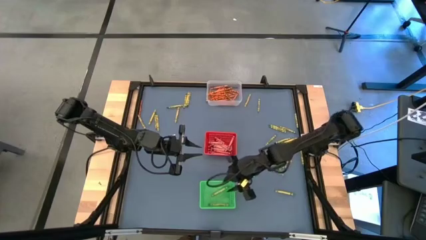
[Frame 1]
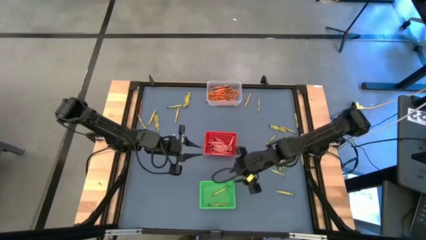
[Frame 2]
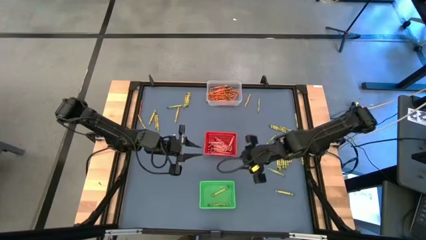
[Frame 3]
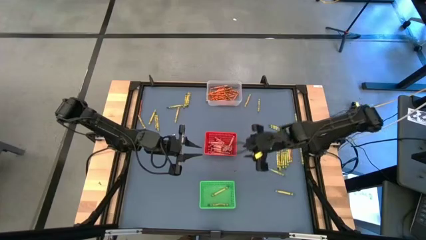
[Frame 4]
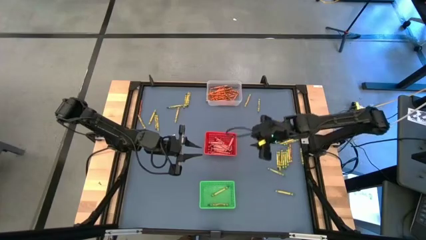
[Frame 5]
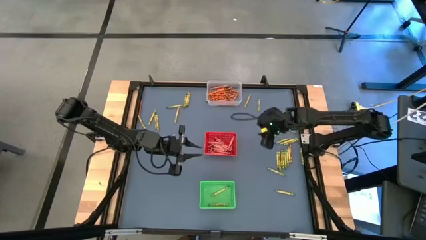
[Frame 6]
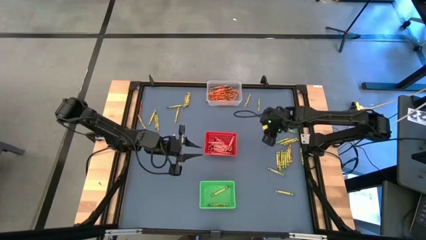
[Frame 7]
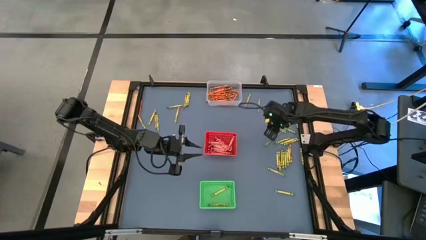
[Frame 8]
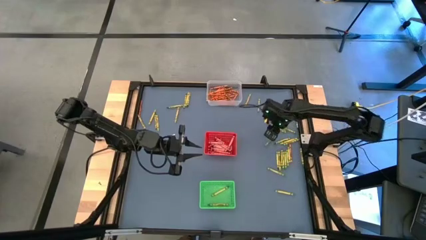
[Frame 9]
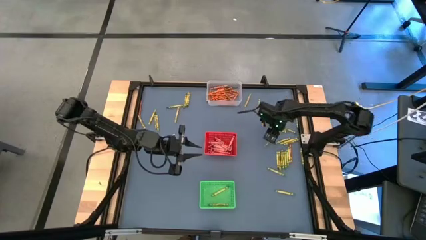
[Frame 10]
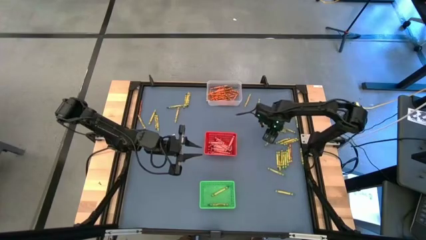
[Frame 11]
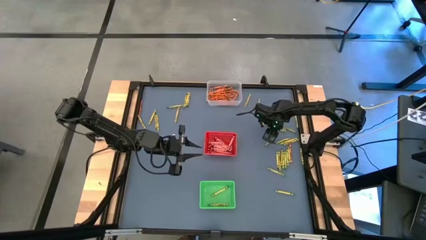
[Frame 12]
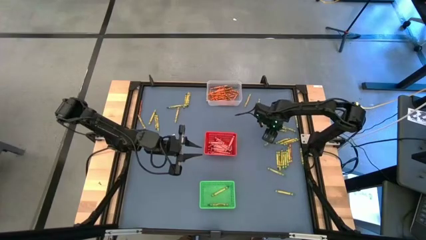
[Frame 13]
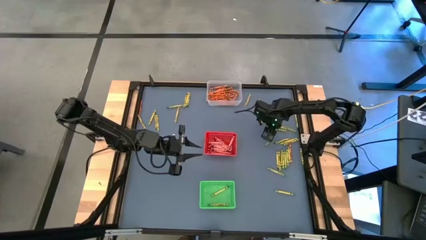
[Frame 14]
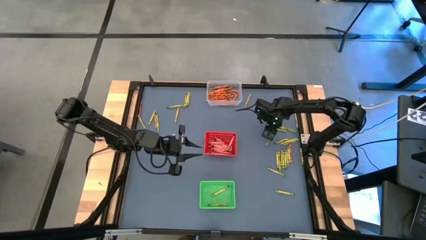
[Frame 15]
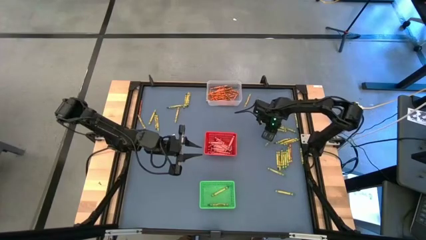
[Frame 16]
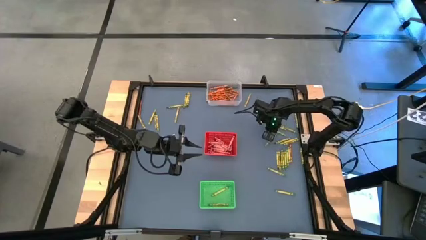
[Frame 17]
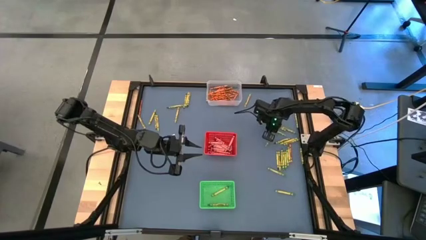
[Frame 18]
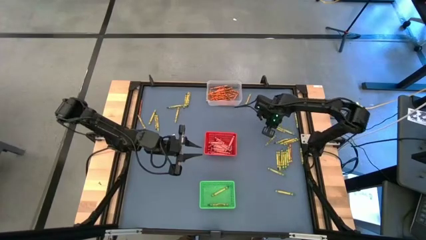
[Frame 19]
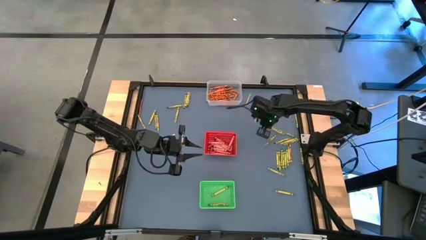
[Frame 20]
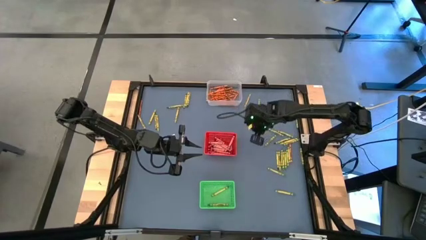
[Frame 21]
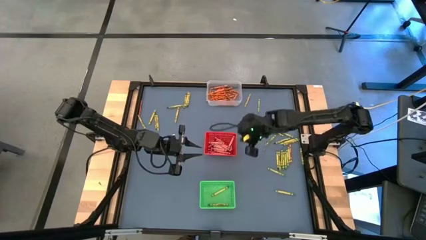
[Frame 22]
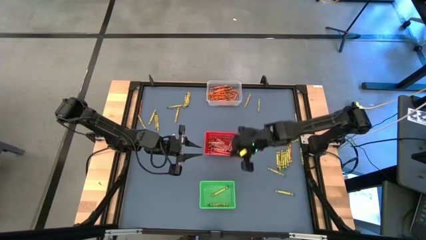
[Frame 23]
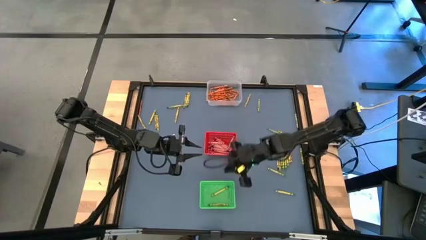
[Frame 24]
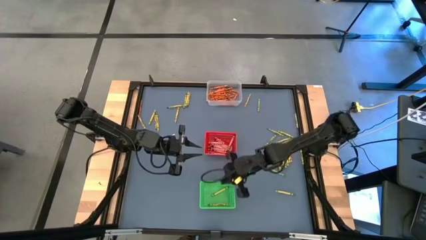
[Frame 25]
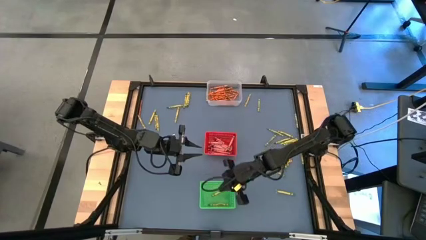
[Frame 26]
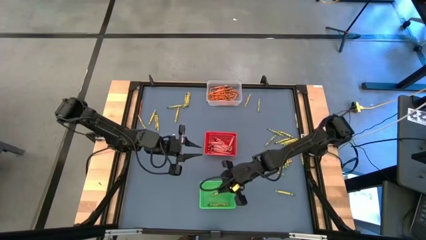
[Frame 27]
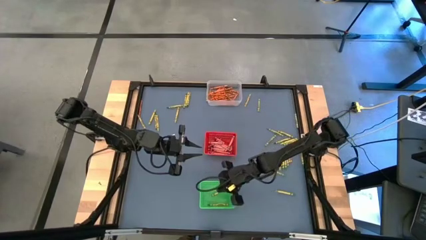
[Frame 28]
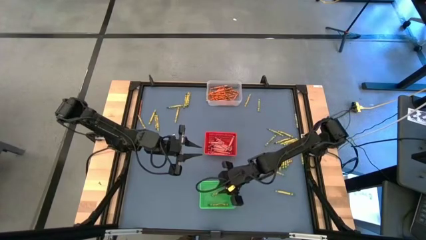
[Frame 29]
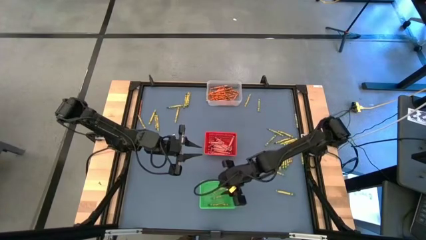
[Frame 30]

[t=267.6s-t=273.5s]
Task: Sort crayons
Put the green crayon into the green bin

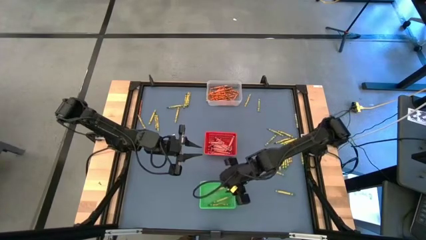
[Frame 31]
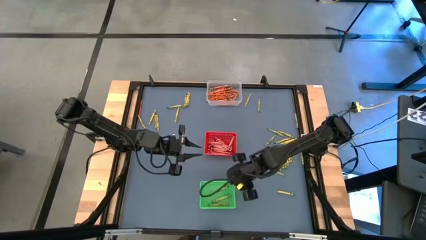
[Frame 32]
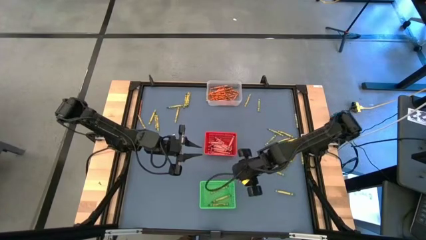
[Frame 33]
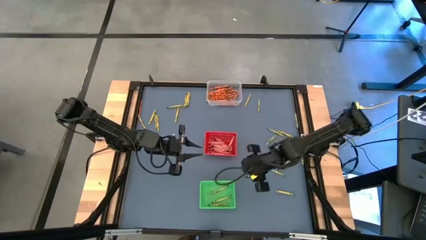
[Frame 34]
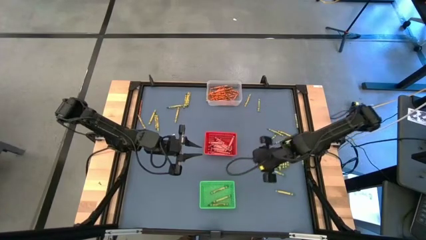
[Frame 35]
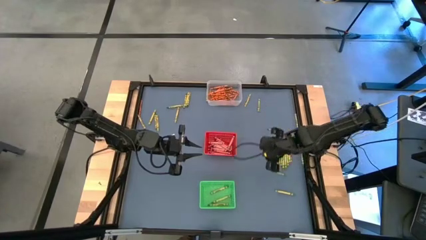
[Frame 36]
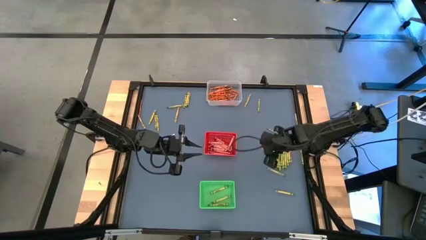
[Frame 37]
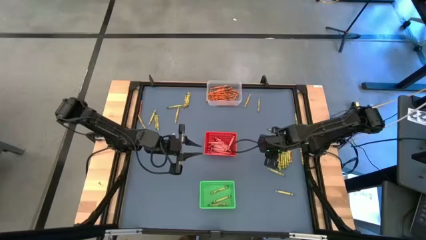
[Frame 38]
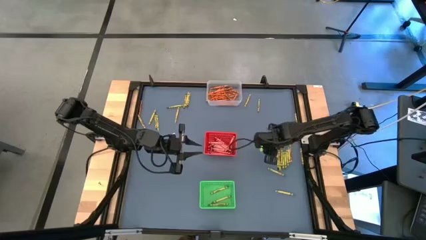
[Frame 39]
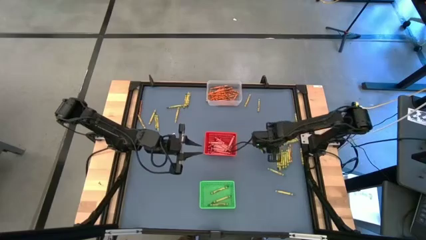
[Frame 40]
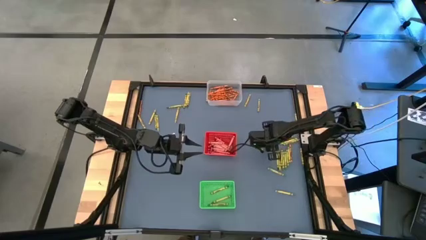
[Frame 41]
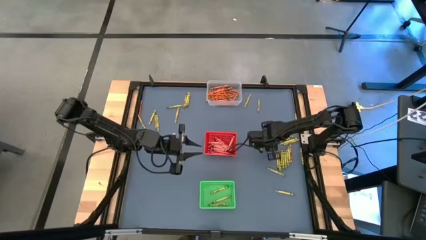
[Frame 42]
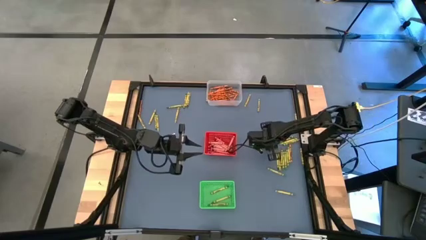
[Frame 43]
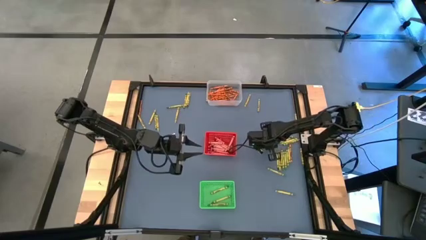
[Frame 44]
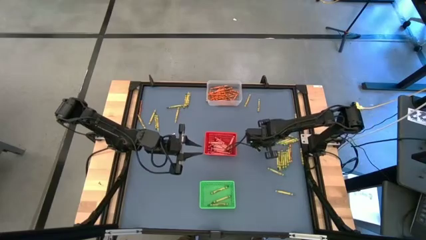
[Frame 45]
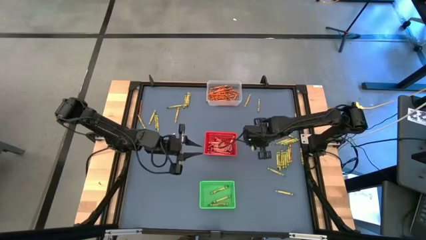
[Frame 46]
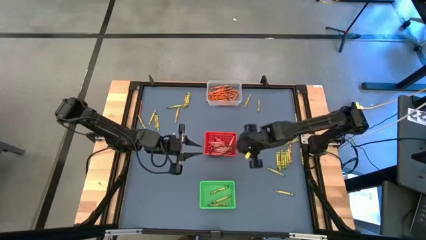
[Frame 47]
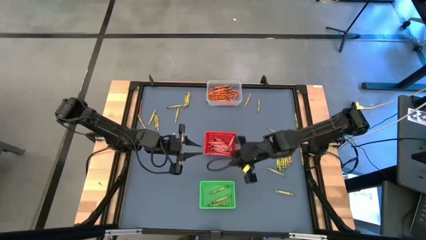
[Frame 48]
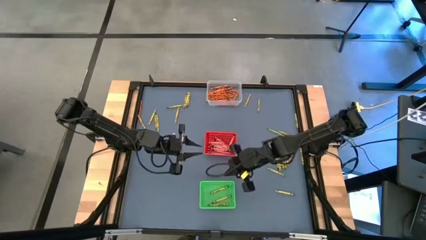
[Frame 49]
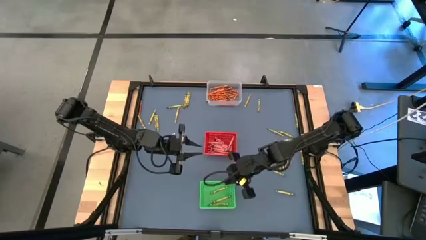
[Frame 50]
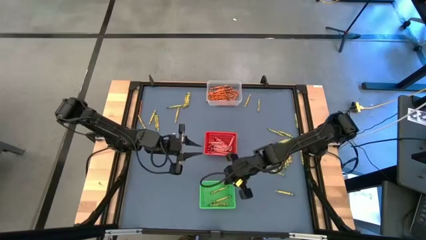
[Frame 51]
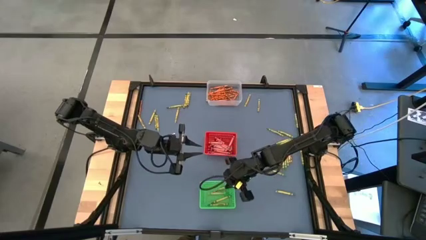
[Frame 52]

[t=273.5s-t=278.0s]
Put the green crayon into the green bin

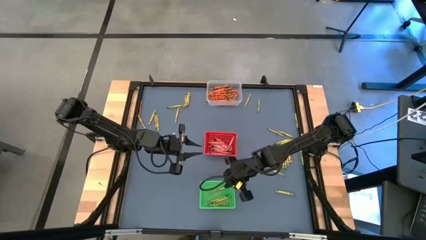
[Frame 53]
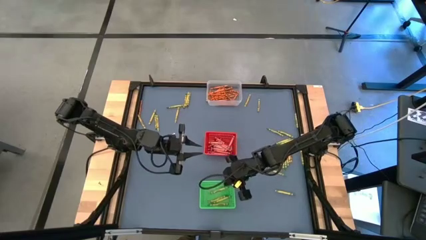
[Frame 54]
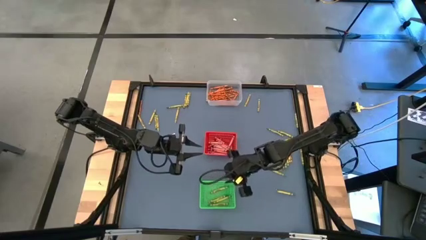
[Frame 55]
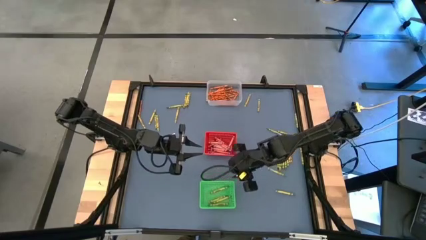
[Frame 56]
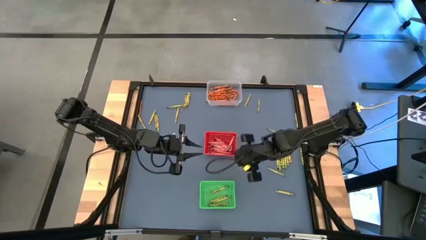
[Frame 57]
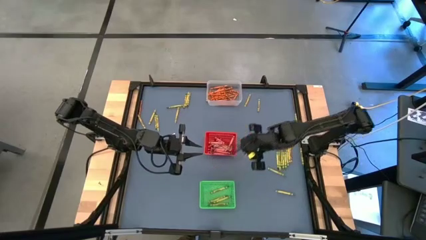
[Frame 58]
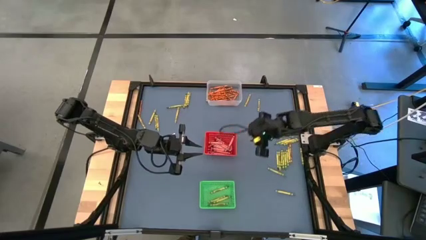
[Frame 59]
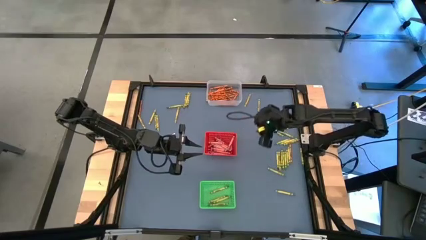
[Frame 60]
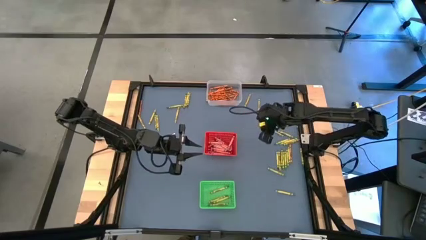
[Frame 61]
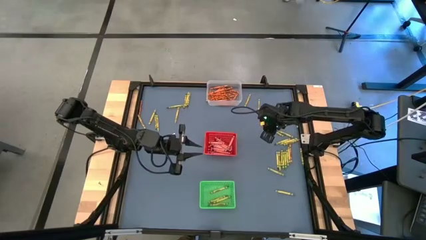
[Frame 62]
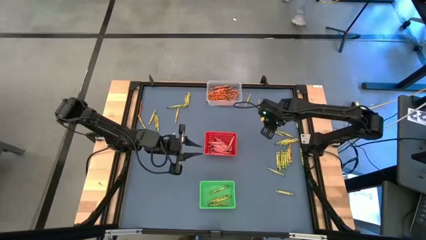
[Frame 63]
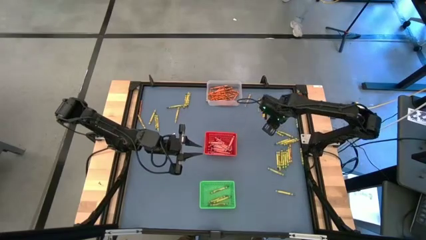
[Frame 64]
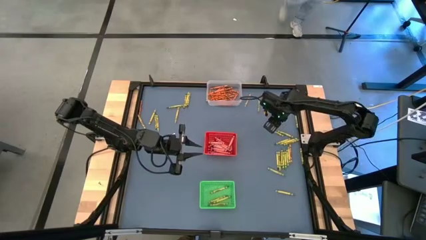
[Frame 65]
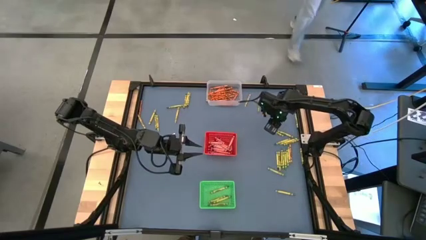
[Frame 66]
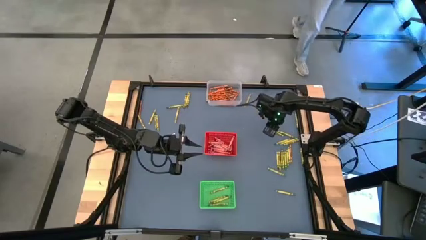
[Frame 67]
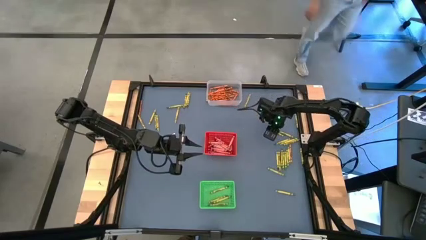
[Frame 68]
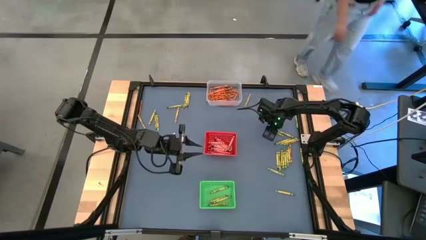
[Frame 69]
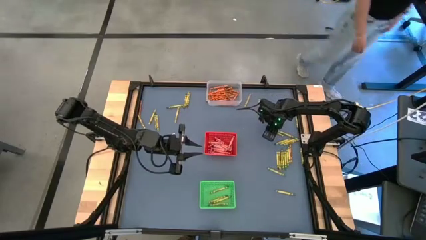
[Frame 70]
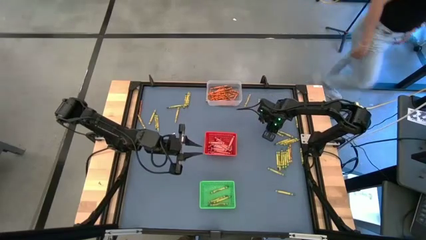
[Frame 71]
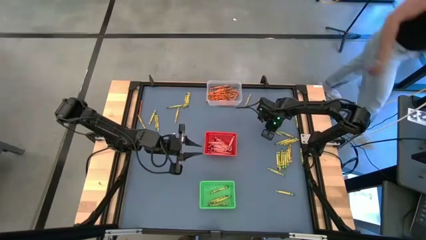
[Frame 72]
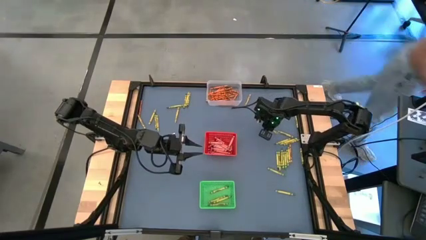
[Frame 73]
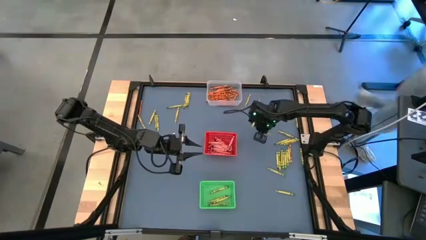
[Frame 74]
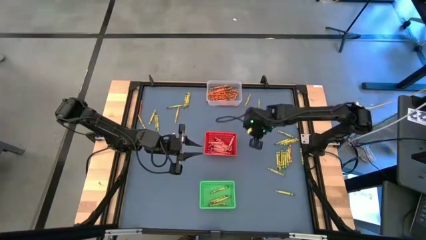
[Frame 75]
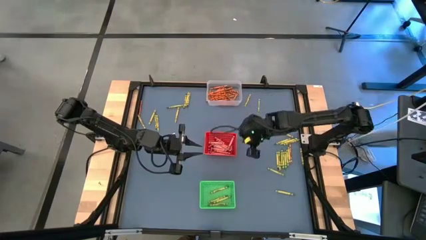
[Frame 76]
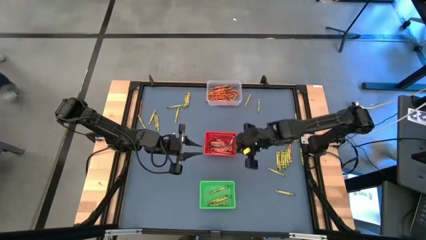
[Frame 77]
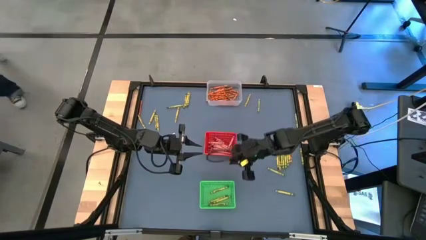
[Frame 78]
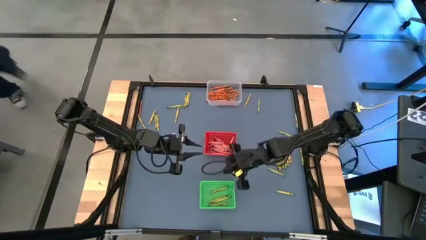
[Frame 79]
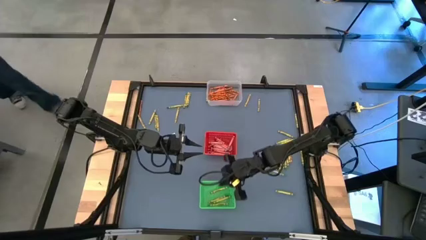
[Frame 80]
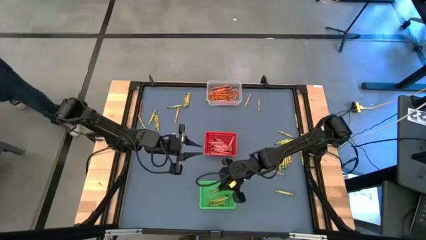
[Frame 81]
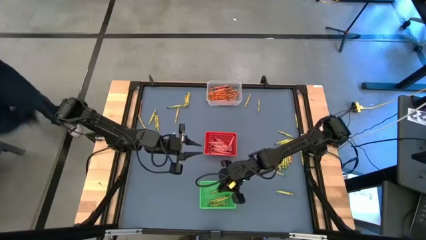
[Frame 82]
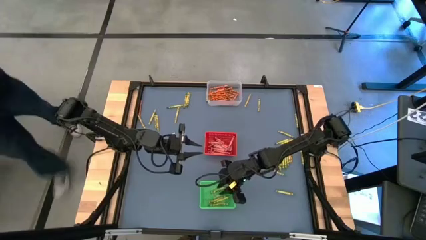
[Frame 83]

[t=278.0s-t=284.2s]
Put the green crayon into the green bin
